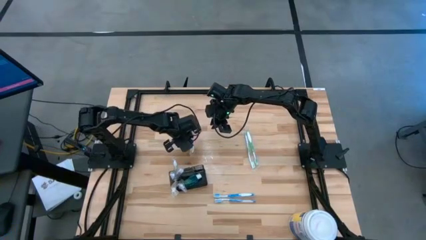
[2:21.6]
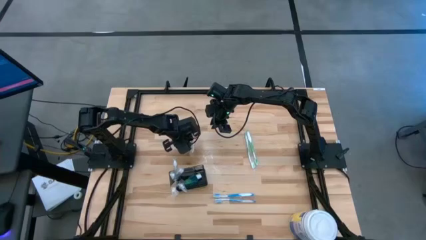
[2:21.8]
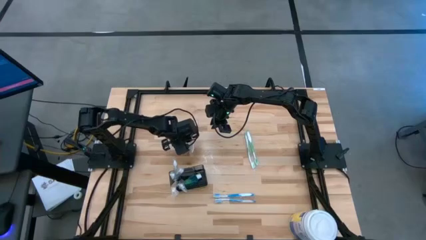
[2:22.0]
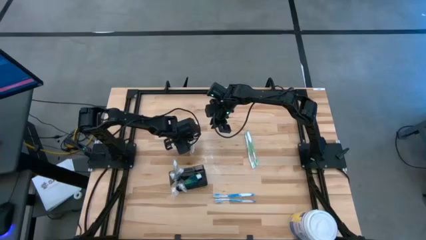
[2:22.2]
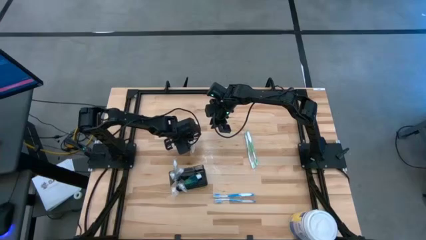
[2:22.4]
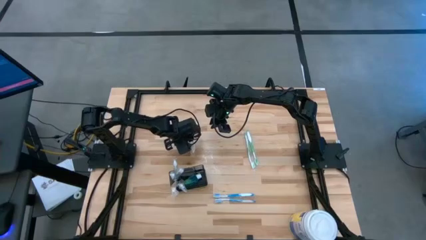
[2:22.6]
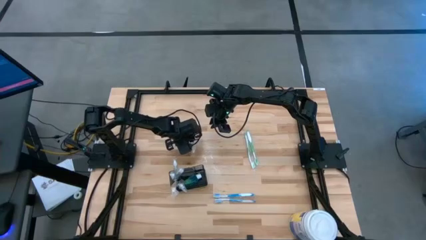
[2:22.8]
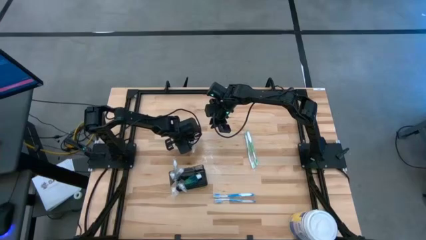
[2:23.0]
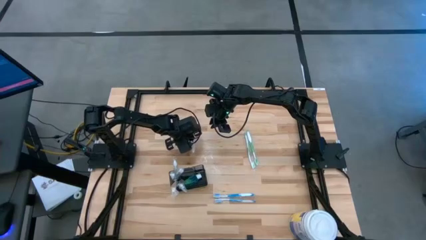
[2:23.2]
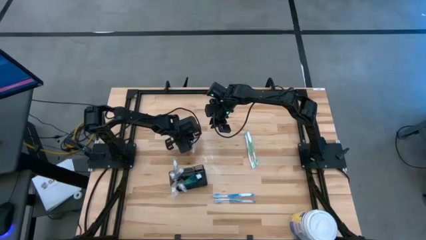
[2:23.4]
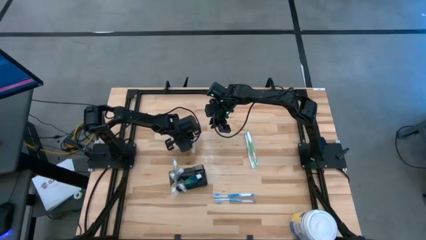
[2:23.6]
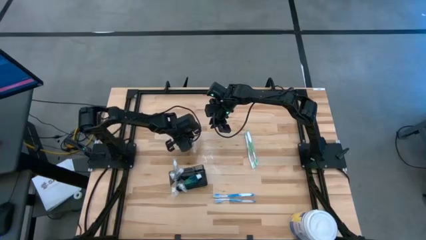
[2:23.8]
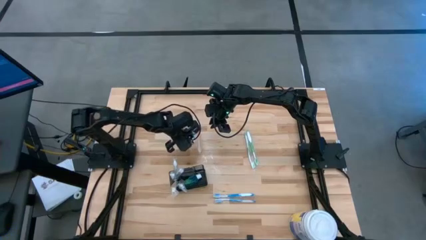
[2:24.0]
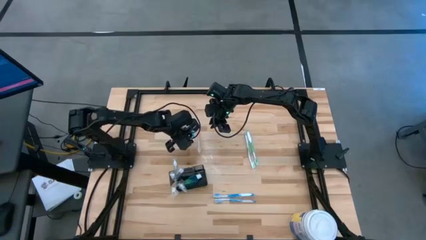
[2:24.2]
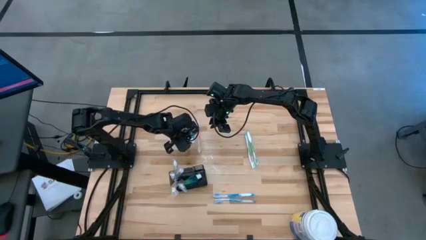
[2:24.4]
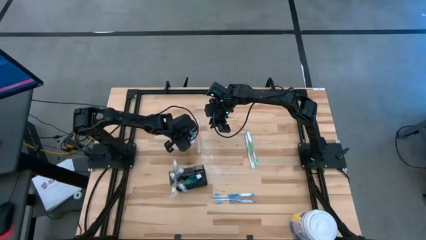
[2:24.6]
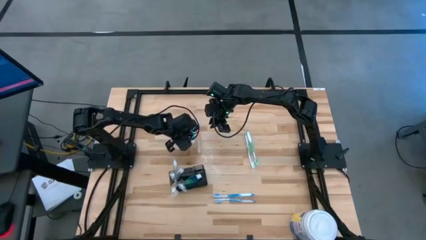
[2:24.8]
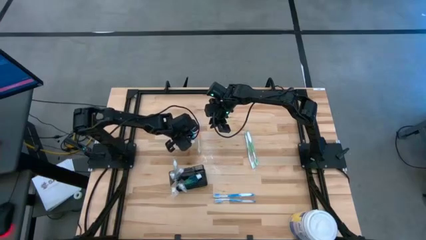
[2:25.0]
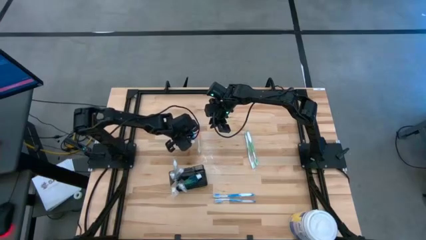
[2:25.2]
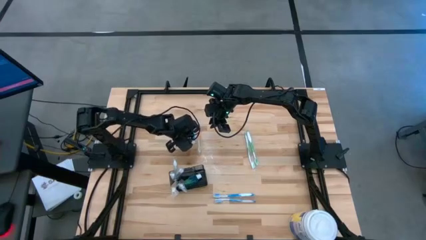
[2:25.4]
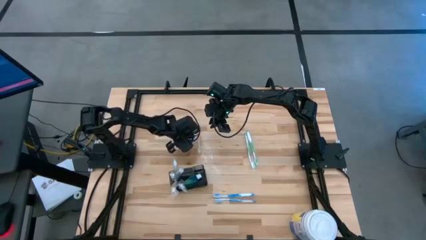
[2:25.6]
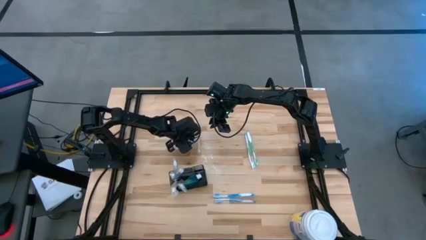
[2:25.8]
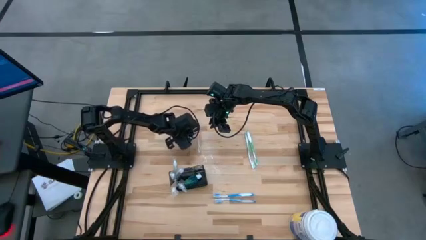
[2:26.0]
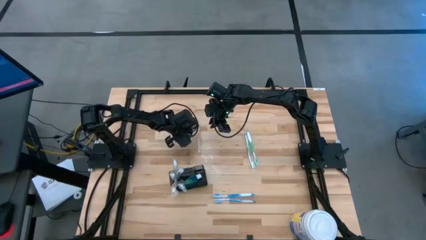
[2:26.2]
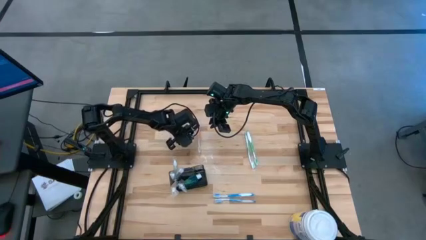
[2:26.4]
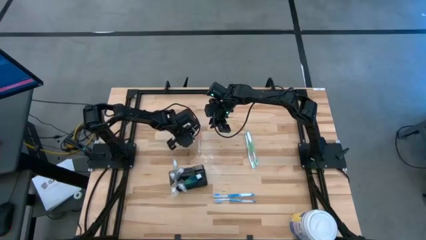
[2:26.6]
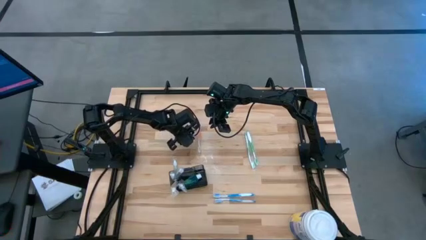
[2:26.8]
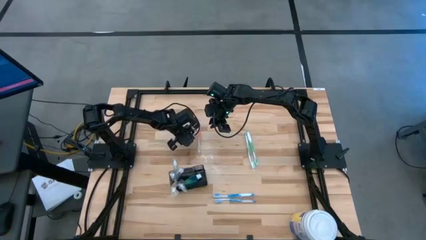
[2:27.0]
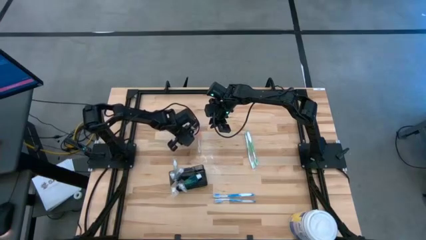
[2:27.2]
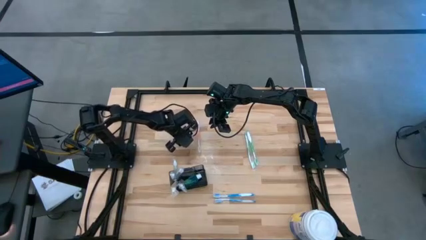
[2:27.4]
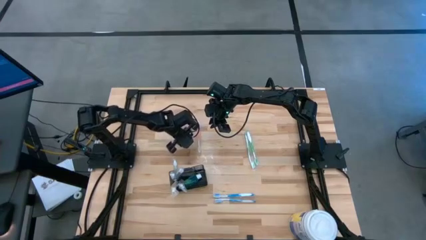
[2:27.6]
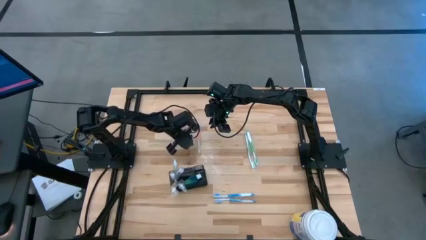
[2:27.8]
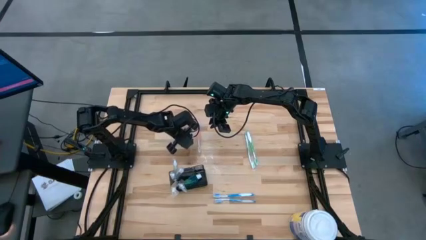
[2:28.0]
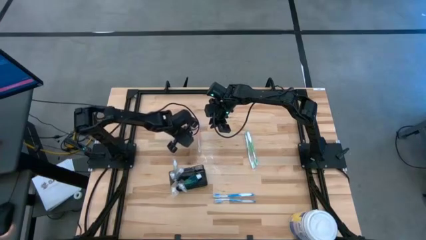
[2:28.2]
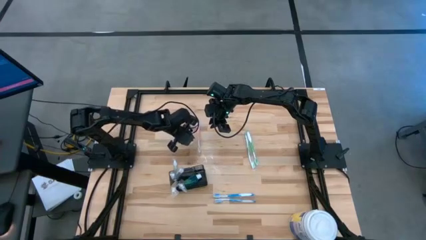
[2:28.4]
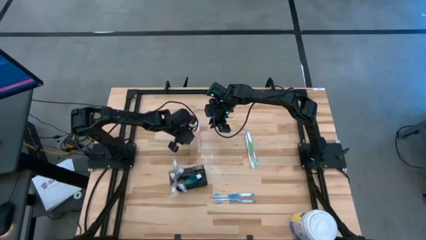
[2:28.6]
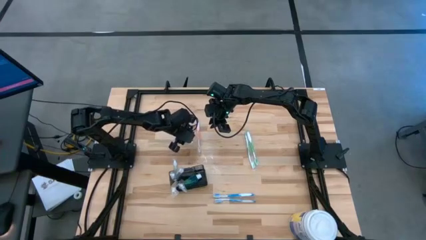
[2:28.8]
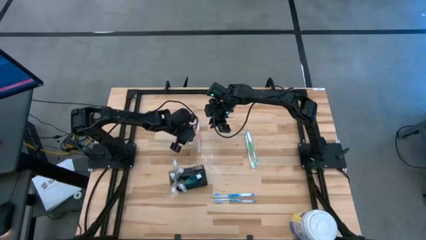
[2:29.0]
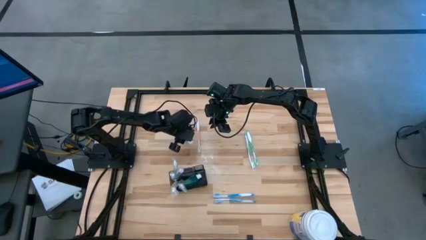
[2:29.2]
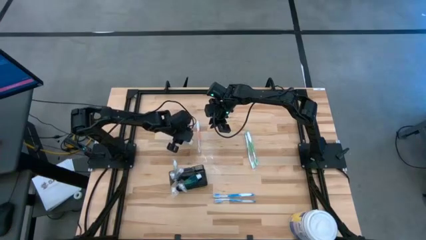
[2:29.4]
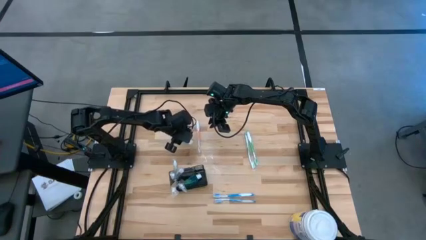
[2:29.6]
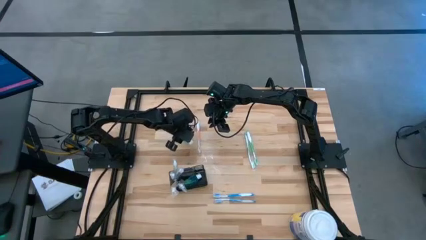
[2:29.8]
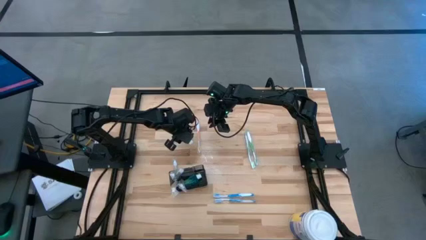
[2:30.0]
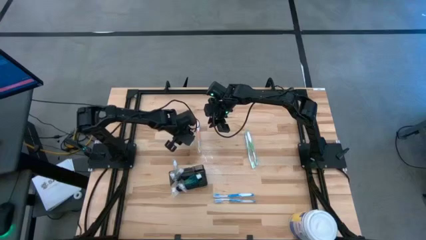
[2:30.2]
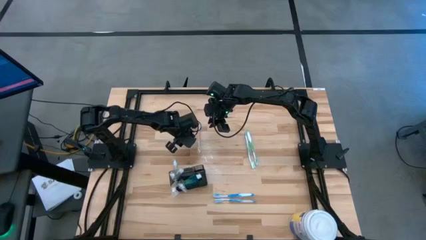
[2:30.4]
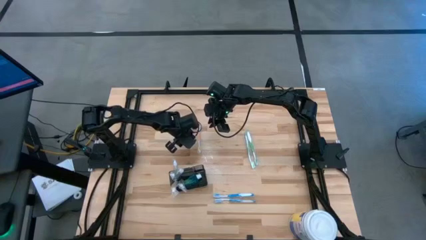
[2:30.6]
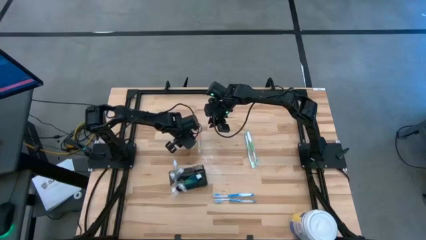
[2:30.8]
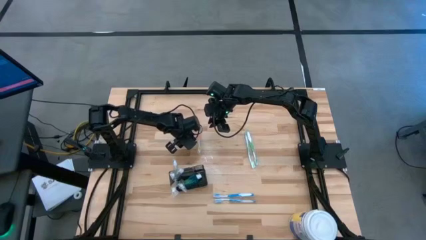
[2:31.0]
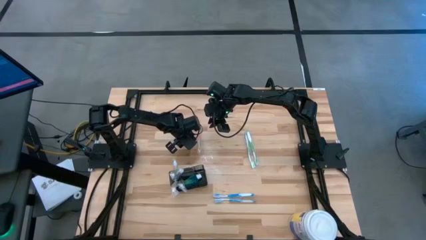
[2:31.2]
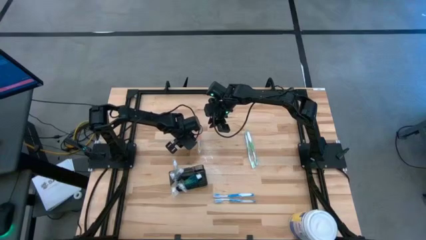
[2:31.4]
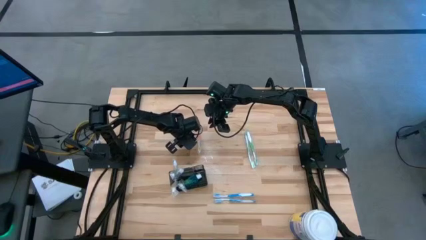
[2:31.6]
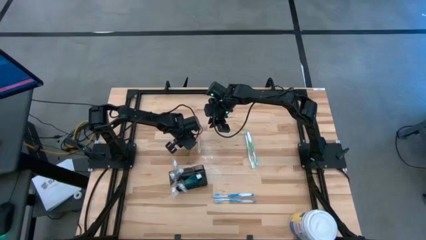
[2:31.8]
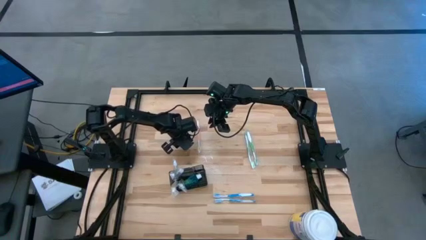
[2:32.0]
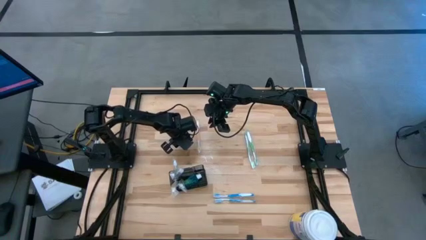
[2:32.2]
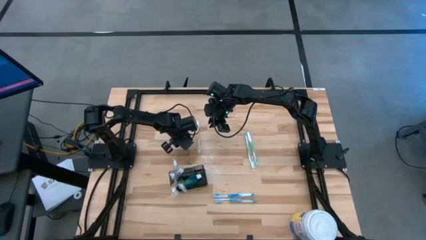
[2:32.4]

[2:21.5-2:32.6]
Task: Pick & Place toothbrushing station
Put the mouthwash into the black toothbrush rack

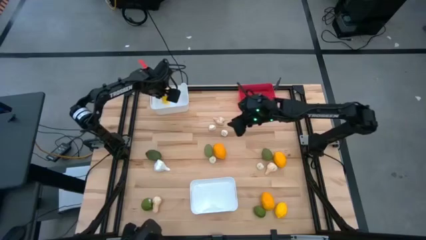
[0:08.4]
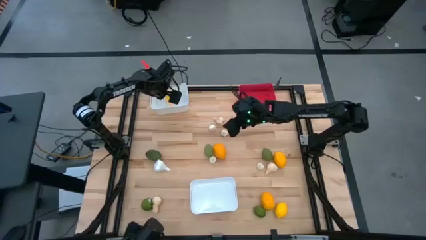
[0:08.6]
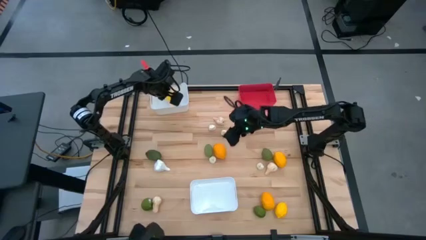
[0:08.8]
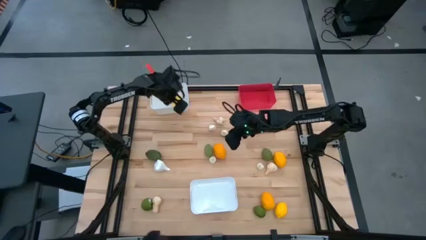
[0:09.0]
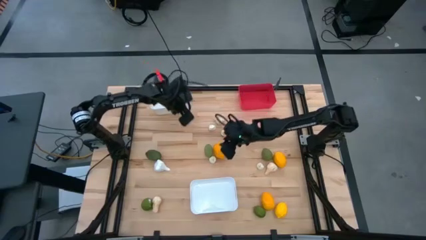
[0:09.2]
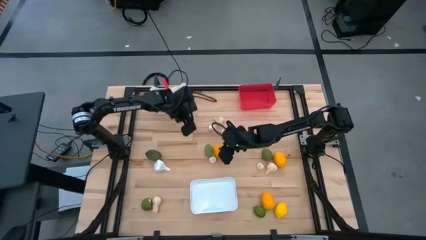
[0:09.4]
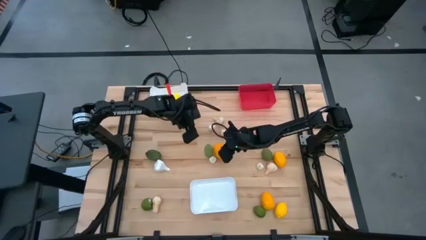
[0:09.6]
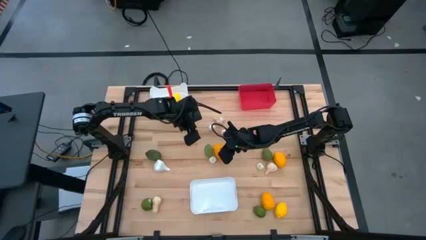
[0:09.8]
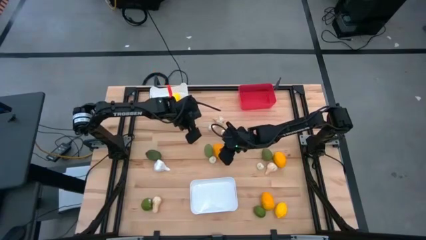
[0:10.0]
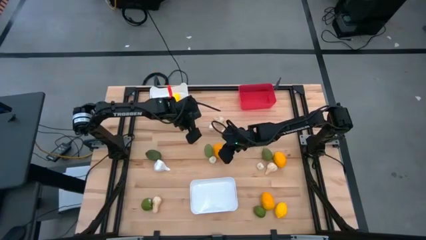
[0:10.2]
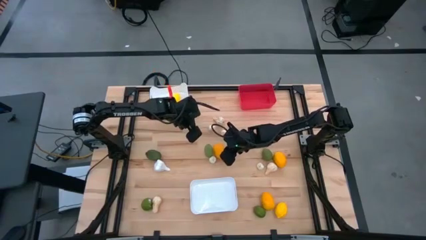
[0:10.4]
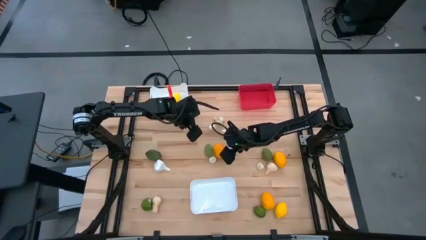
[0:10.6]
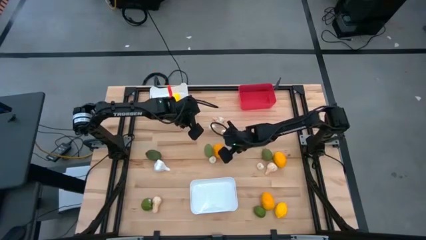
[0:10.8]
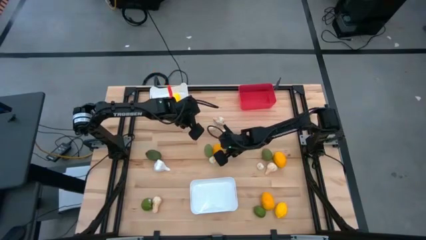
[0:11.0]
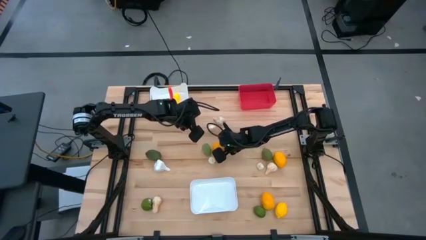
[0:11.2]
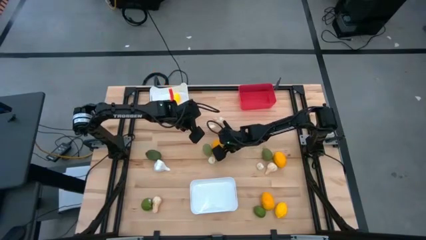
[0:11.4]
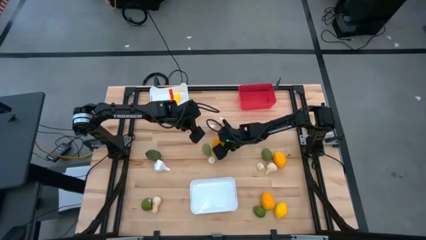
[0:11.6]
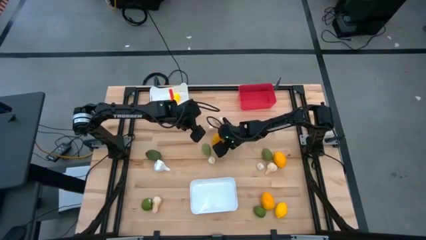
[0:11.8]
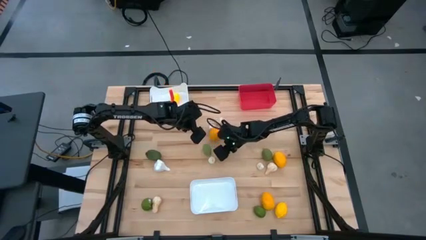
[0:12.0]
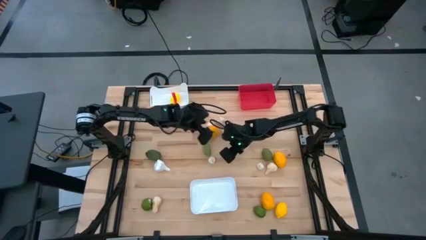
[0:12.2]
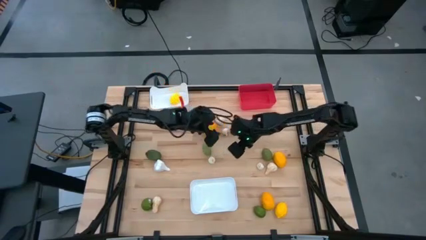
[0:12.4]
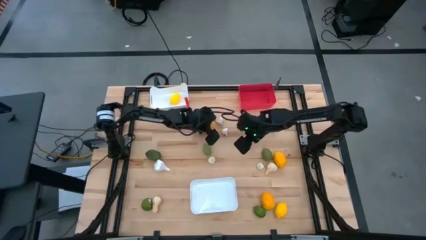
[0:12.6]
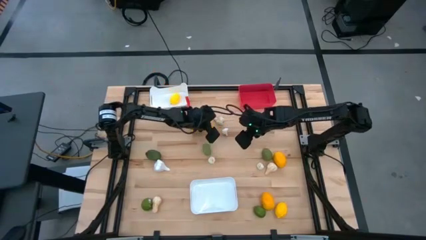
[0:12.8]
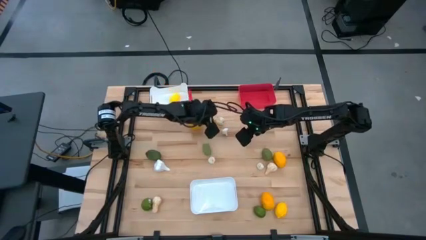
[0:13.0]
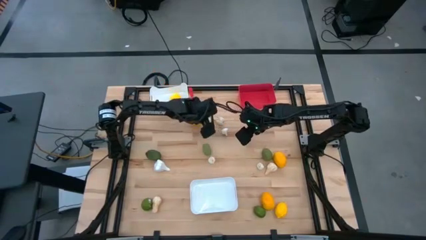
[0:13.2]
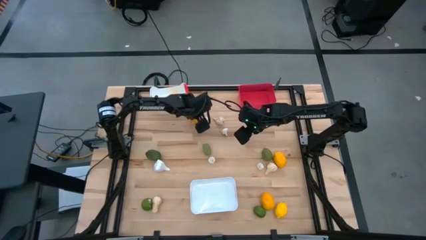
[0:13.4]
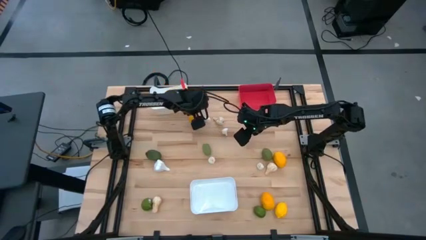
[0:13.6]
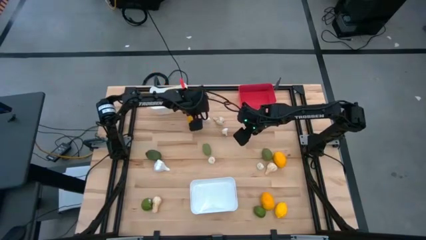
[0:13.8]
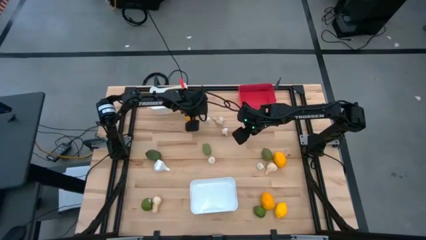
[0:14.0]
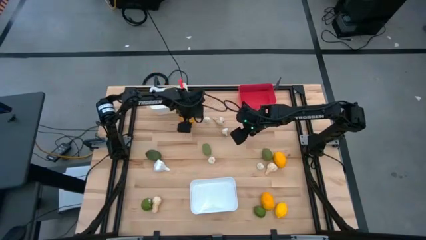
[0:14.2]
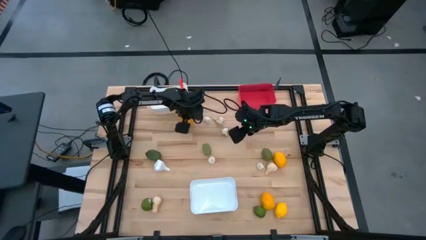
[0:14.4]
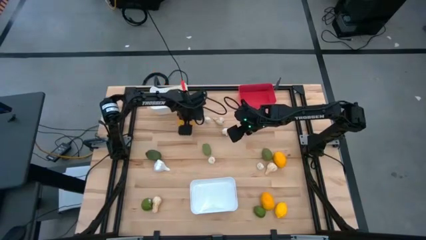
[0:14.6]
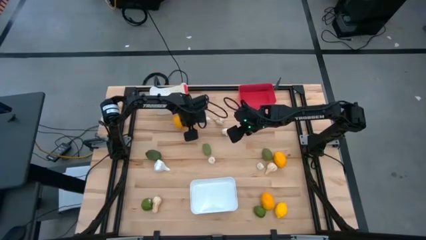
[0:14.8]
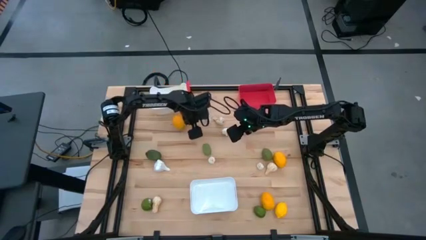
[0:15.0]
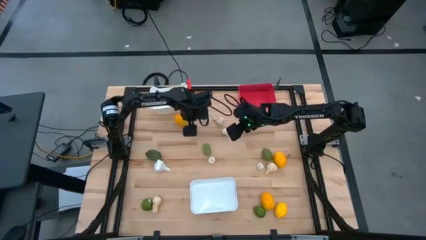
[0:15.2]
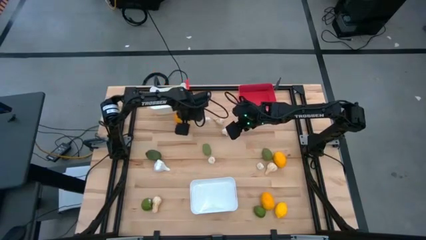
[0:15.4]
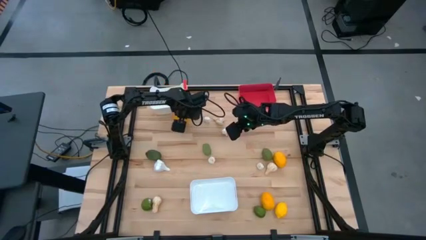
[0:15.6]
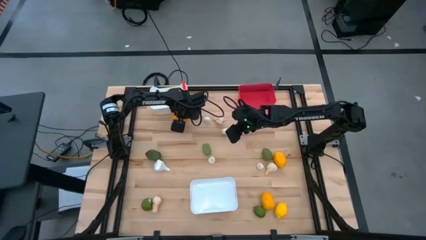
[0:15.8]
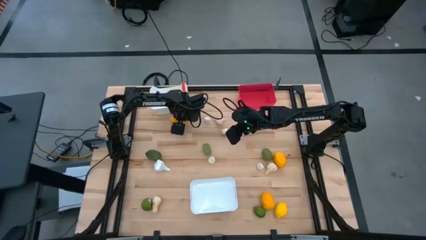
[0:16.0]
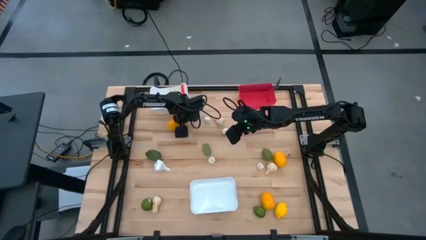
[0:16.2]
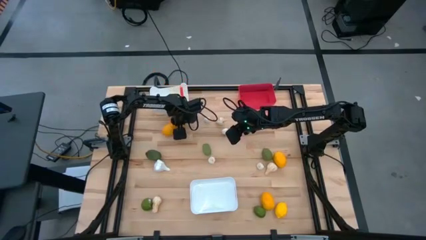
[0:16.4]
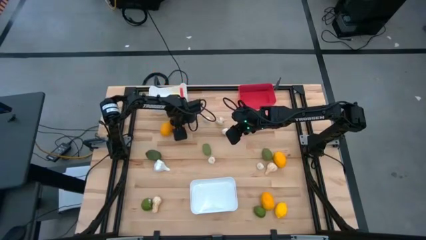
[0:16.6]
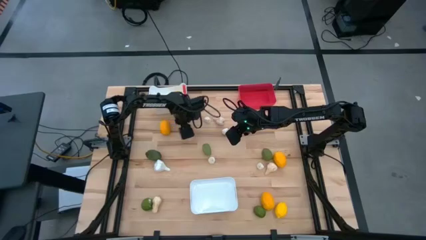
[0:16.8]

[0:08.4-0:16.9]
Task: Sort produce into baskets
Put the yellow lemon into the top white bin
